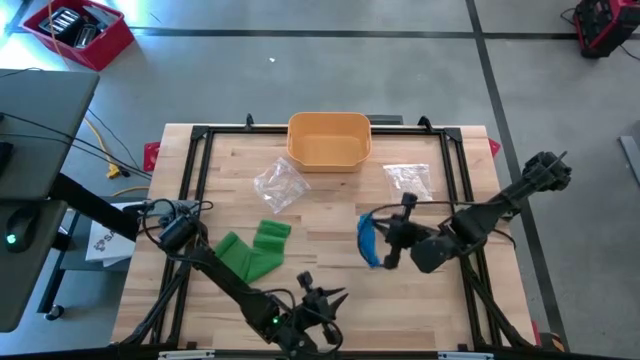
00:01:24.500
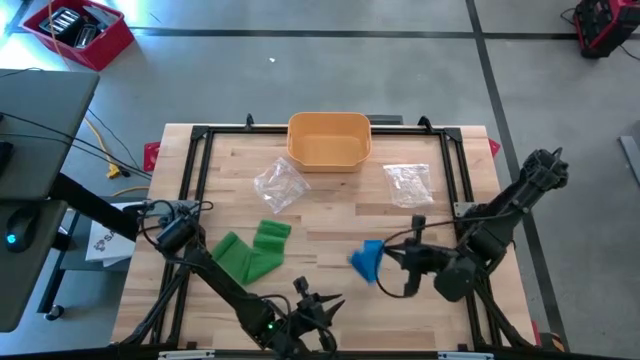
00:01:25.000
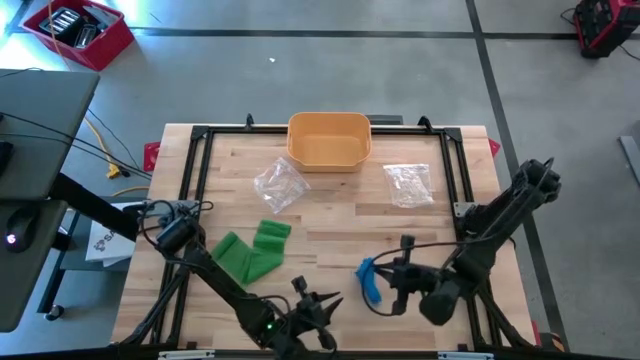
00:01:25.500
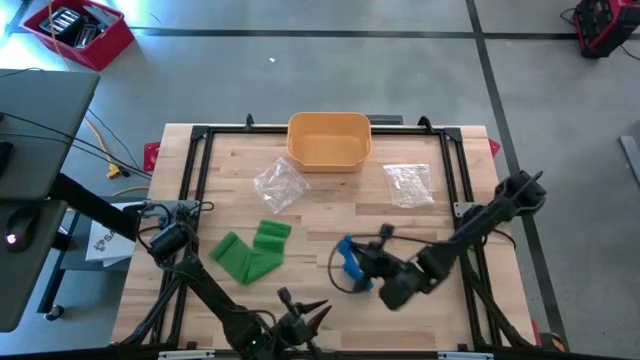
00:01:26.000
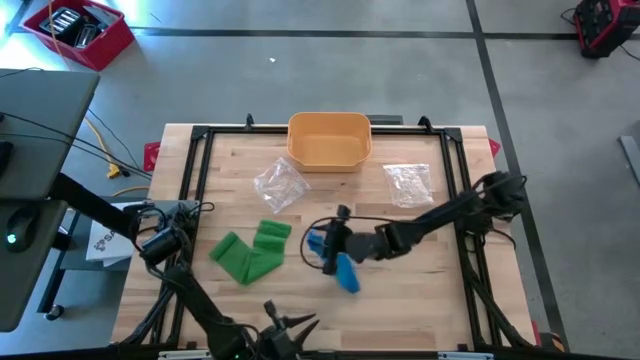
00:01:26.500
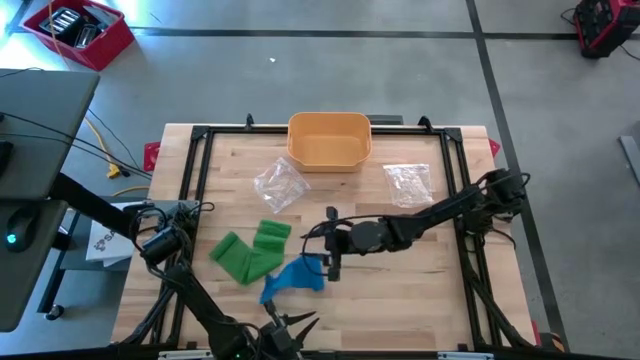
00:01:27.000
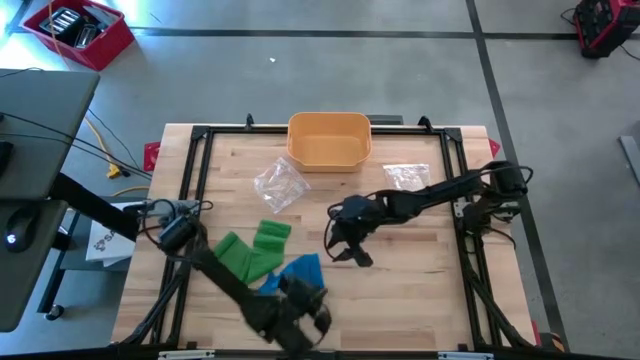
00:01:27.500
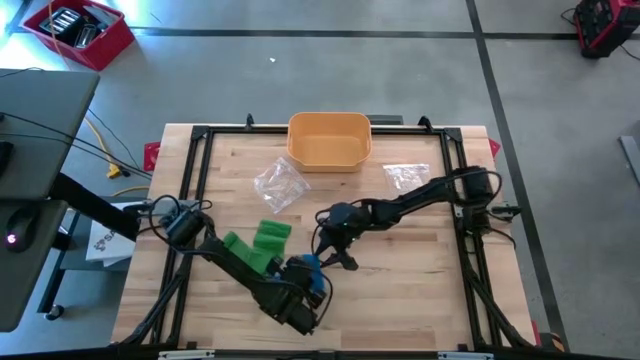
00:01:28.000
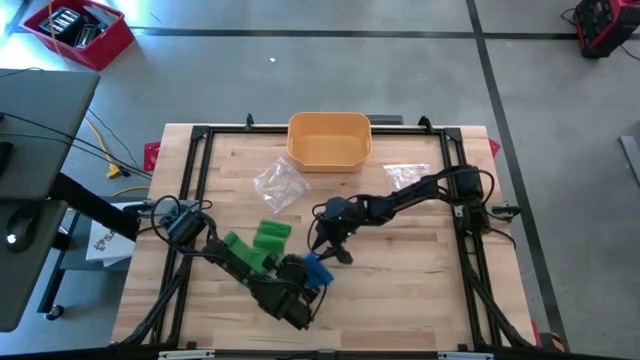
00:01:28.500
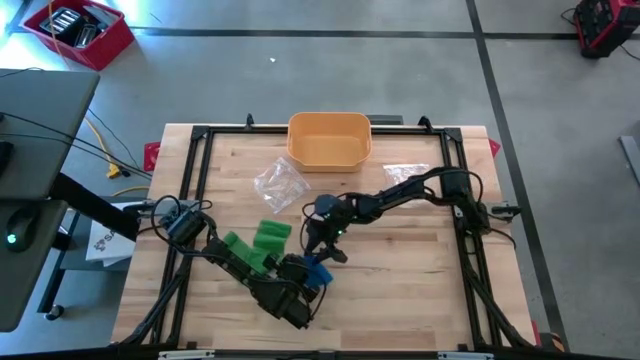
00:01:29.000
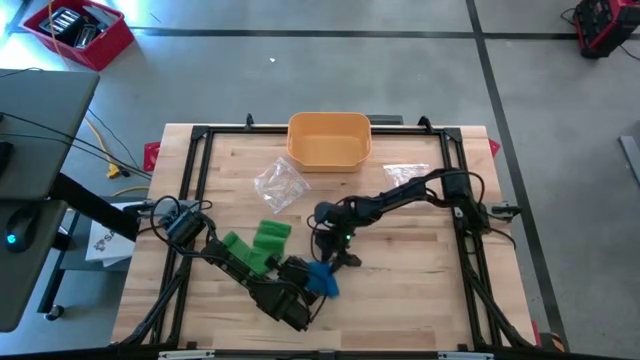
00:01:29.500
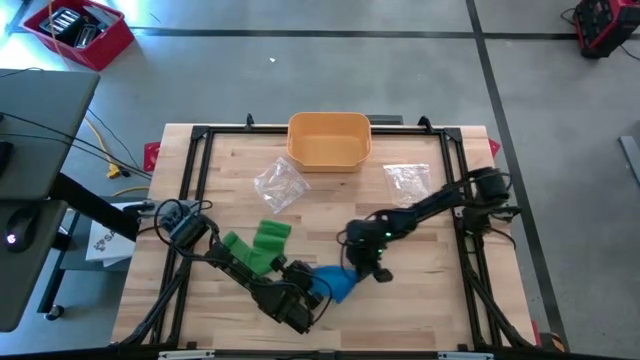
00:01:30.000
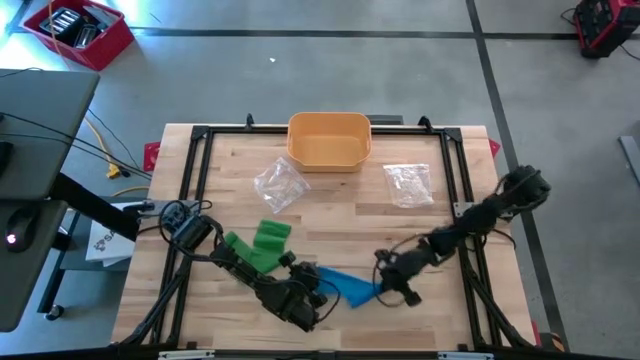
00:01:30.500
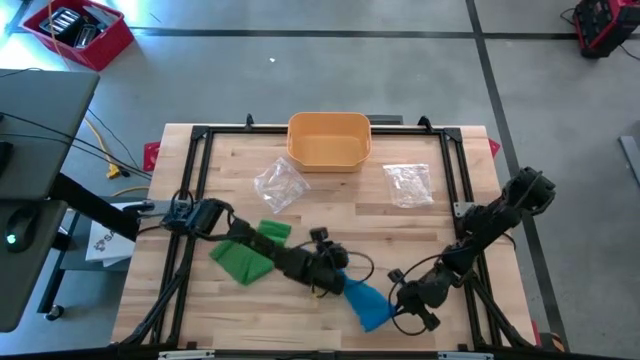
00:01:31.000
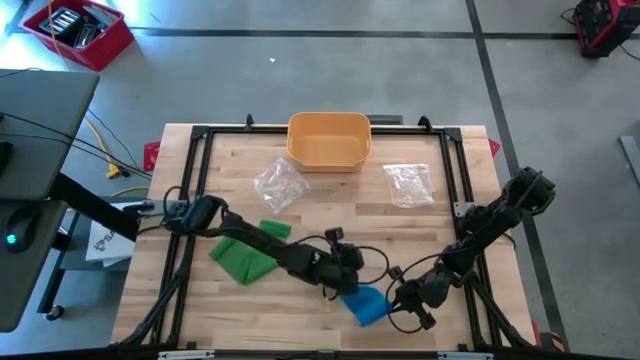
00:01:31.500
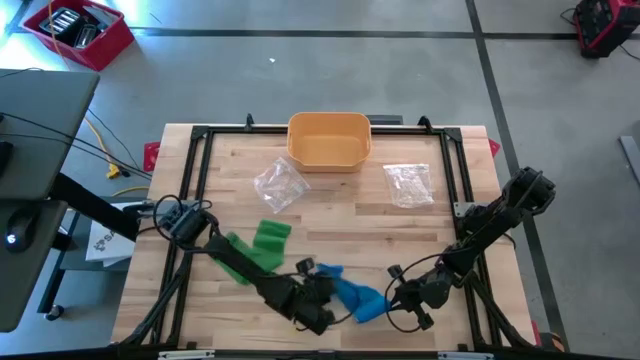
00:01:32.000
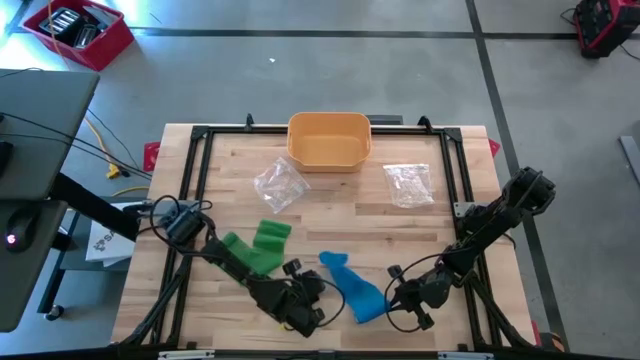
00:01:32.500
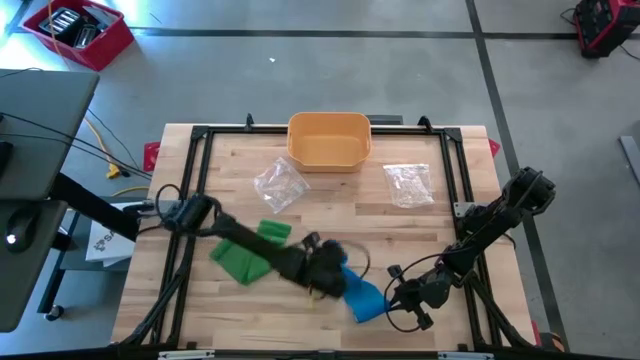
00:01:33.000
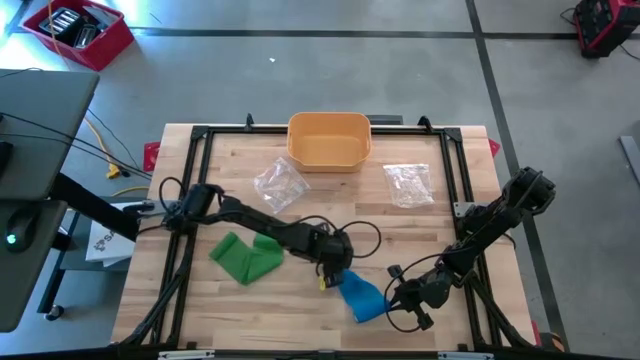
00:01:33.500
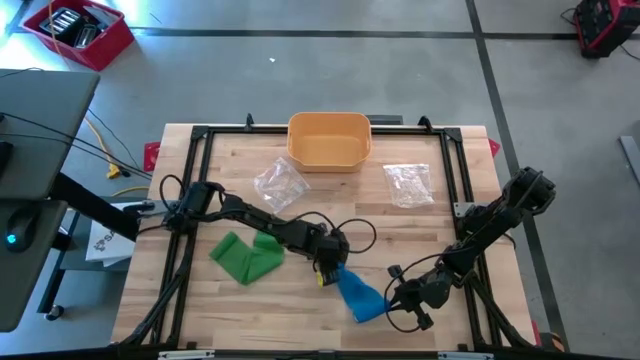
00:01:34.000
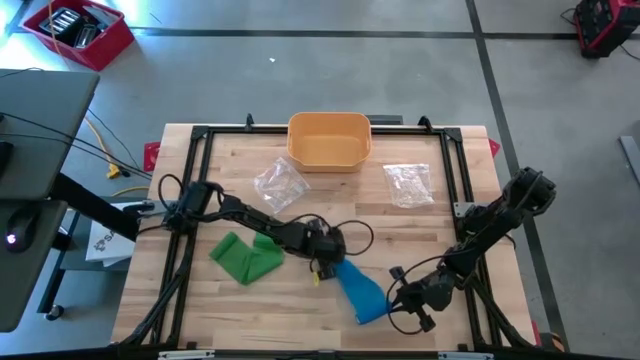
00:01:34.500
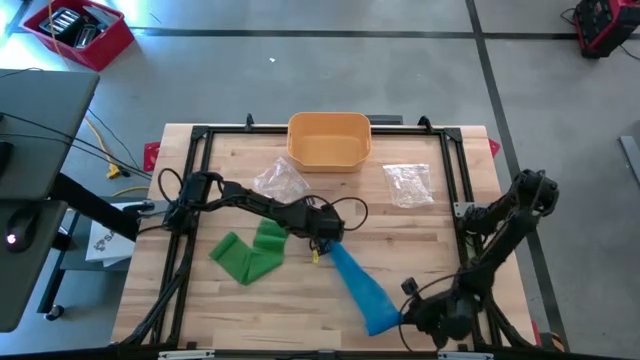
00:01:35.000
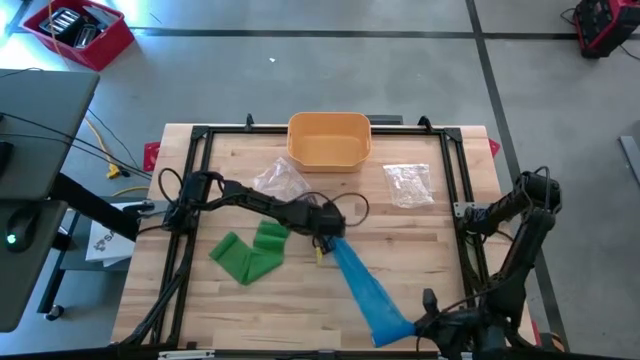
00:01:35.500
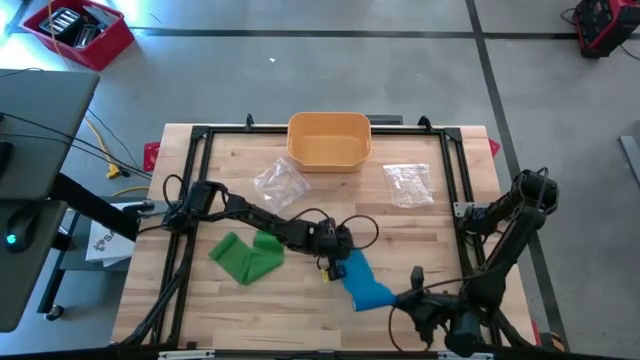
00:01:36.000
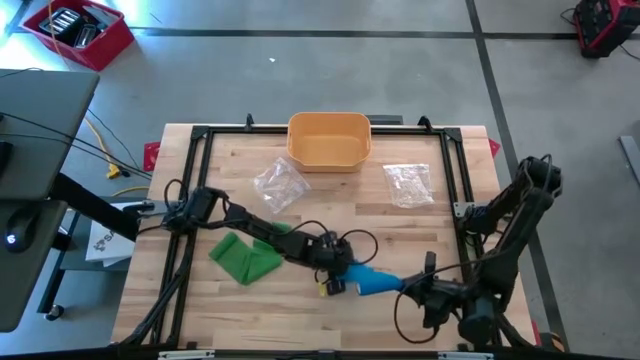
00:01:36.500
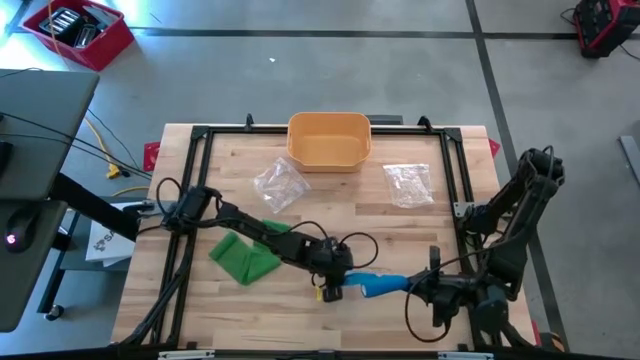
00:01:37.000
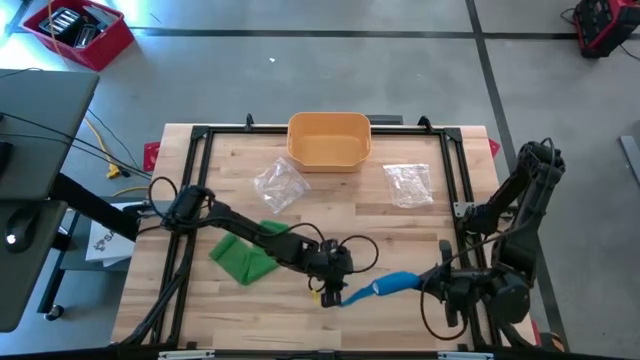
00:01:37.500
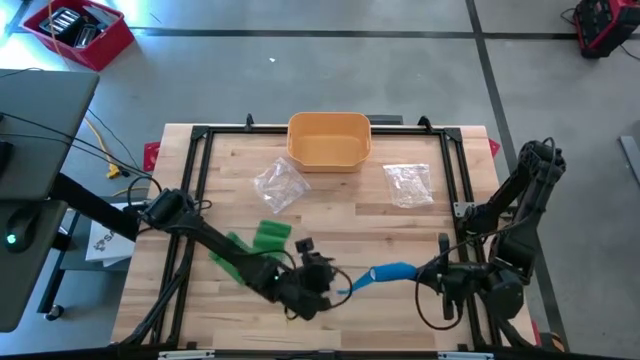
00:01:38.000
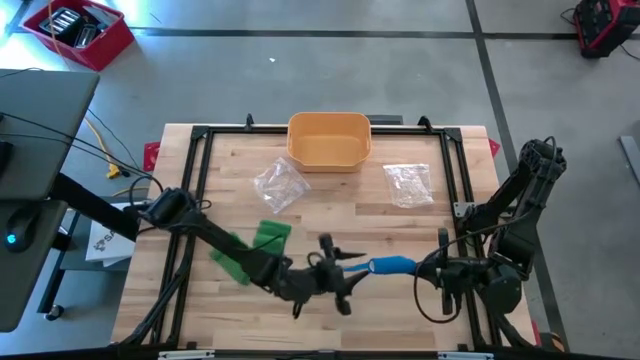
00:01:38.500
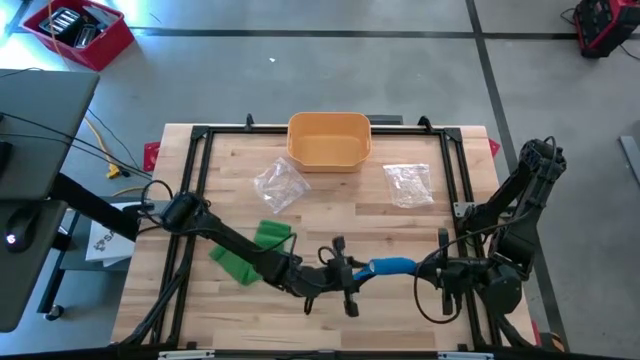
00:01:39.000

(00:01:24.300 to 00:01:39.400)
Task: Roll bandage
Roll the blue bandage

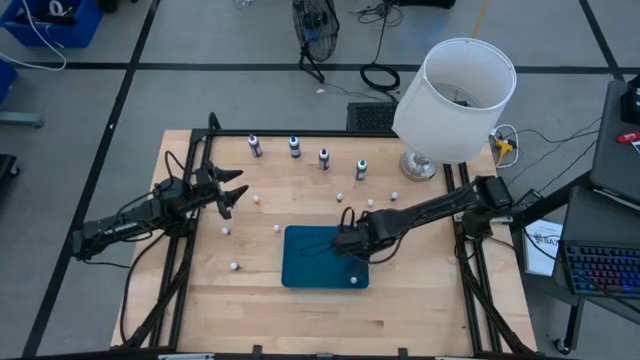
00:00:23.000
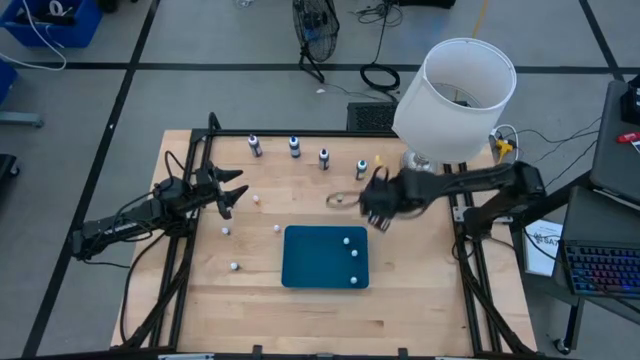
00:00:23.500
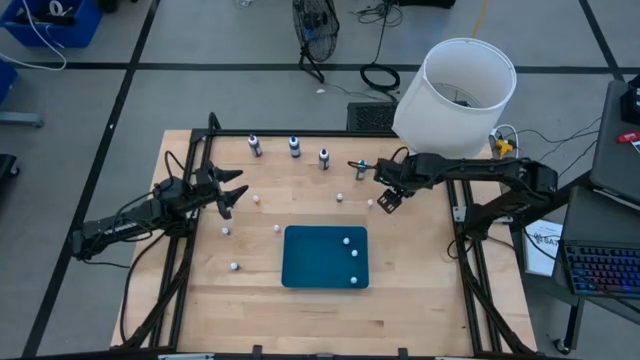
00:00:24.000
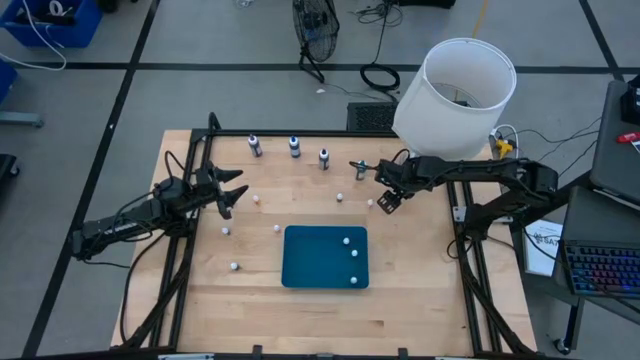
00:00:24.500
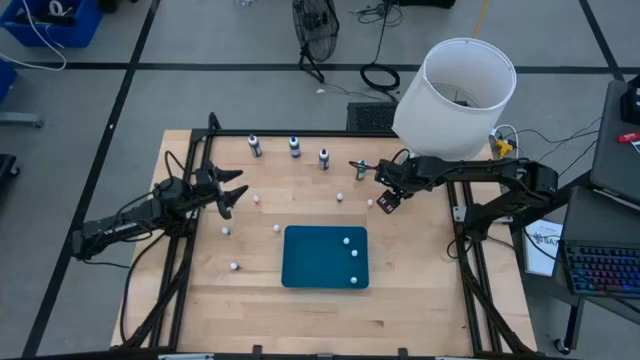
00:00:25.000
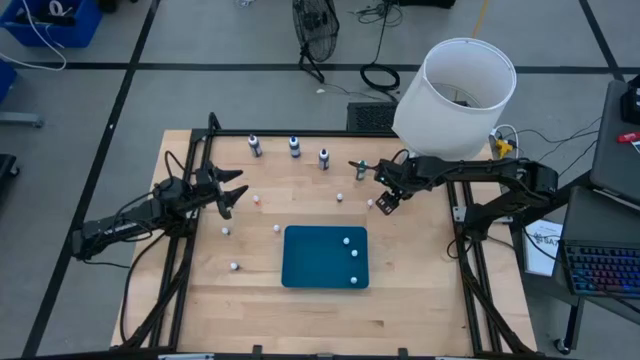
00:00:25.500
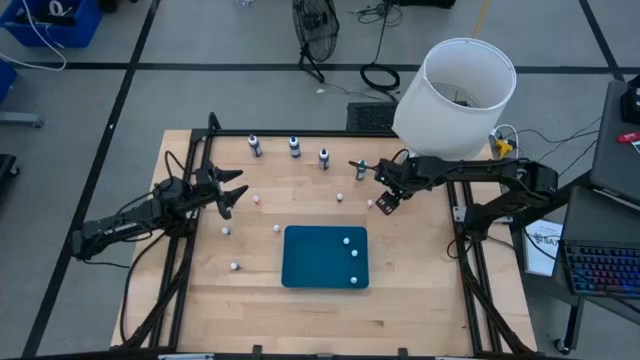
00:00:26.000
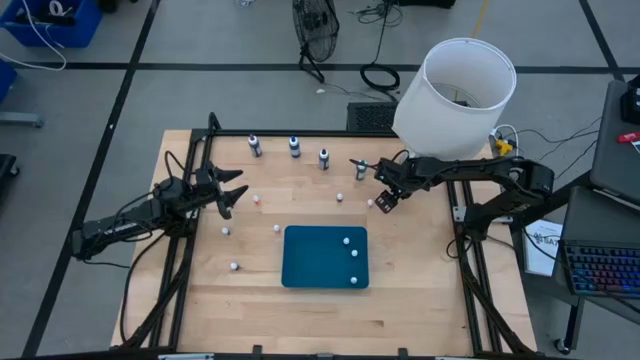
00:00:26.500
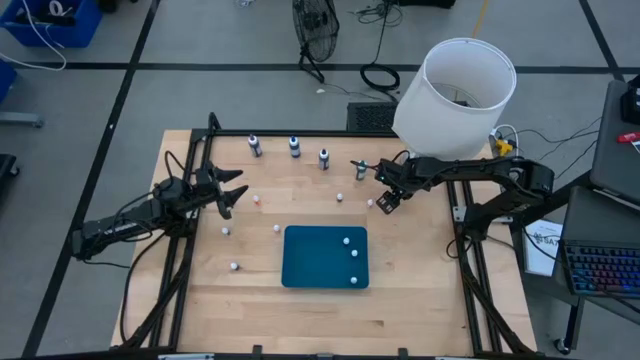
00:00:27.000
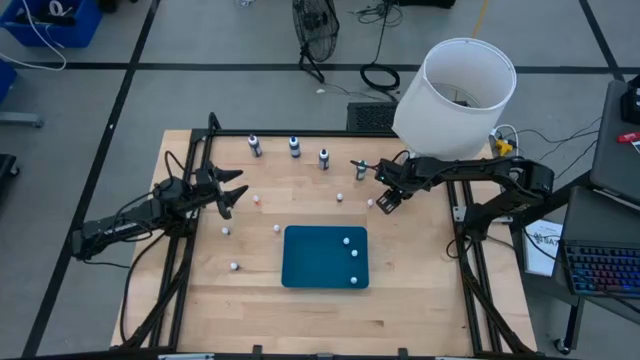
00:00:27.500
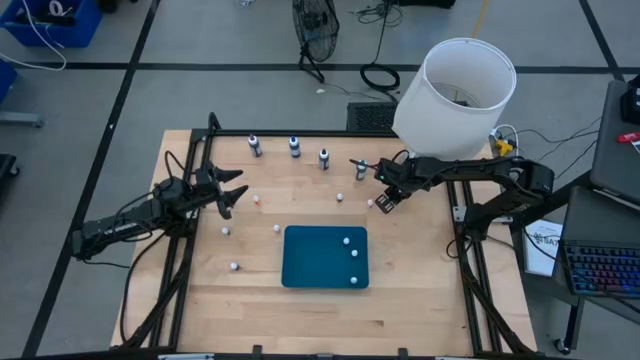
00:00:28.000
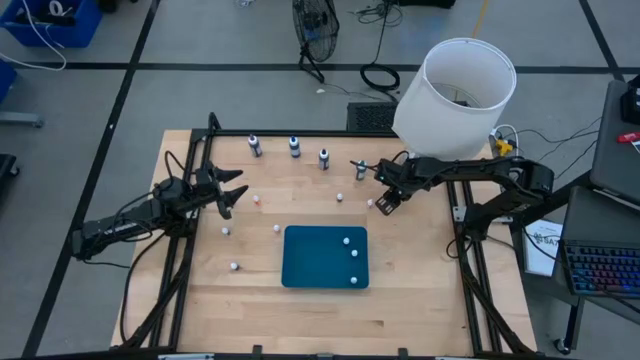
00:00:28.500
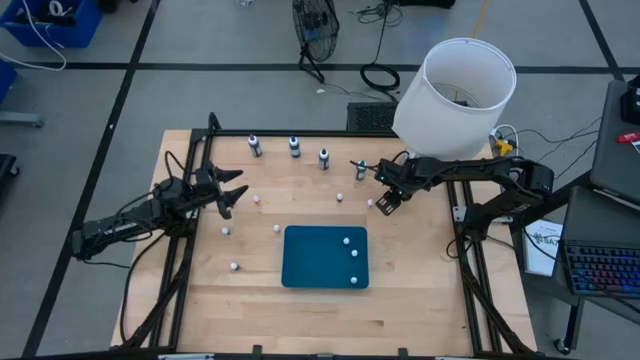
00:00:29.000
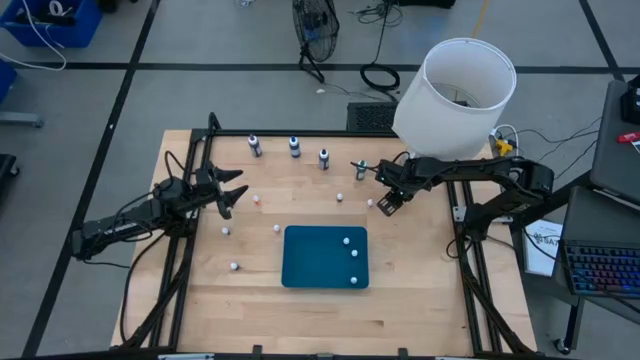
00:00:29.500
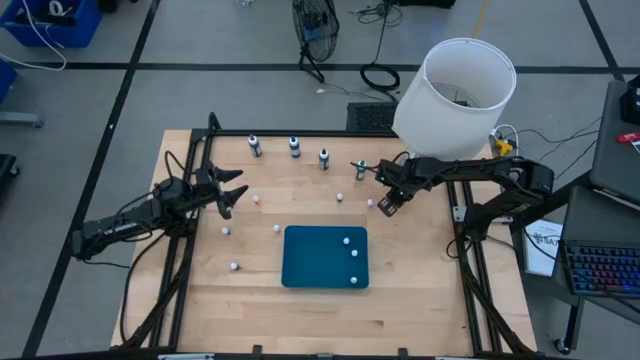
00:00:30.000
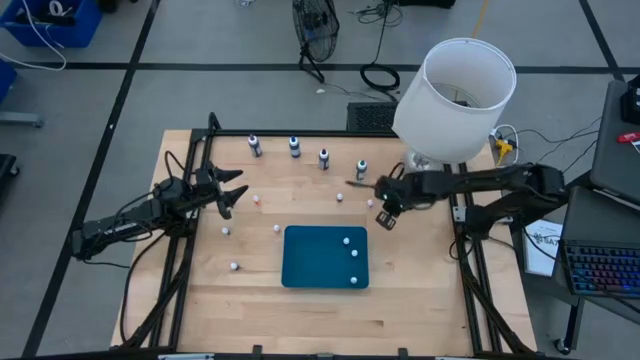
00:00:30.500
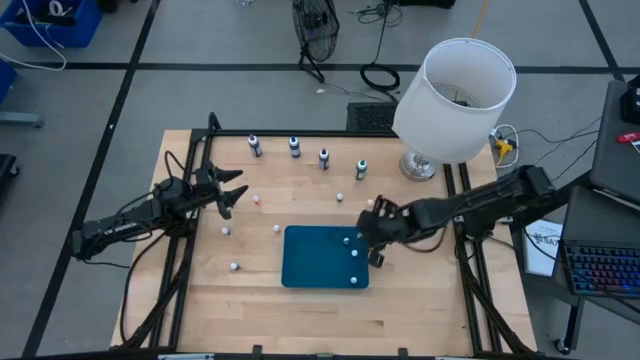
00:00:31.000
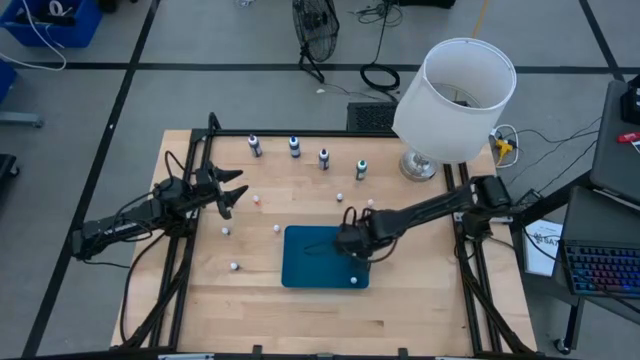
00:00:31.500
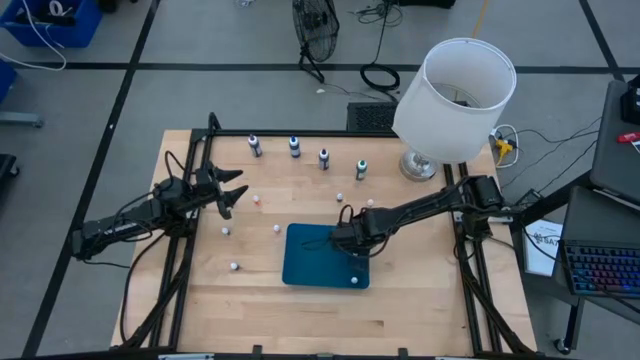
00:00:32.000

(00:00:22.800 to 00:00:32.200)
Task: Pick & Place food coloring
Put the small green food coloring bottle into the blue bin
